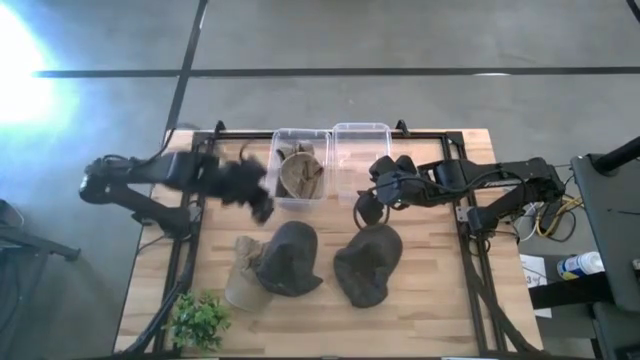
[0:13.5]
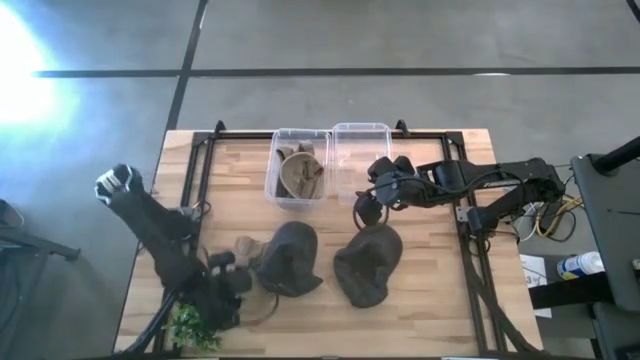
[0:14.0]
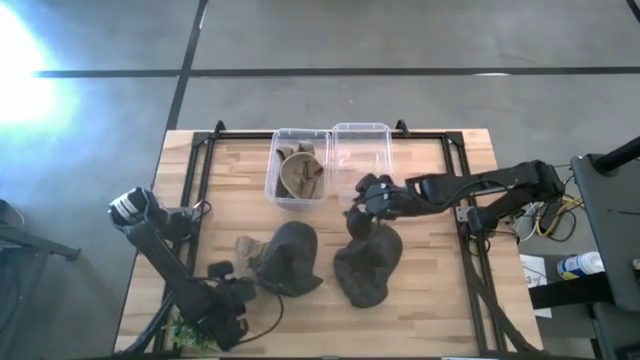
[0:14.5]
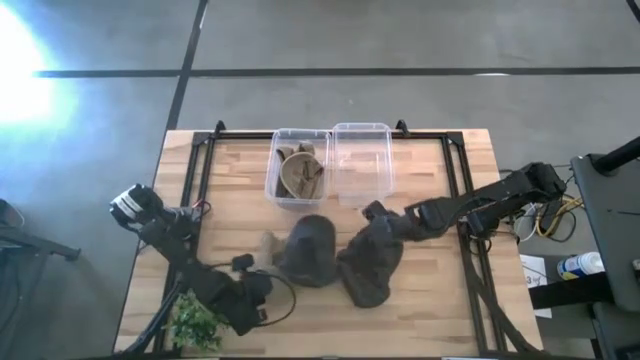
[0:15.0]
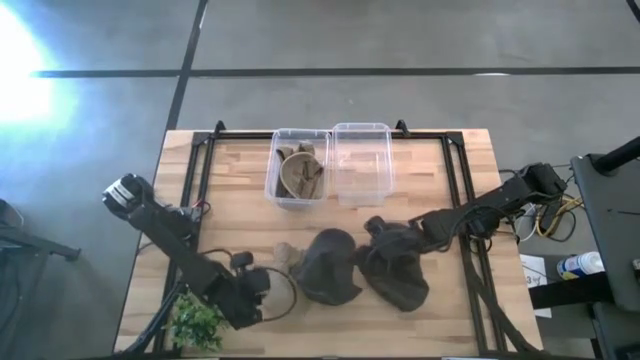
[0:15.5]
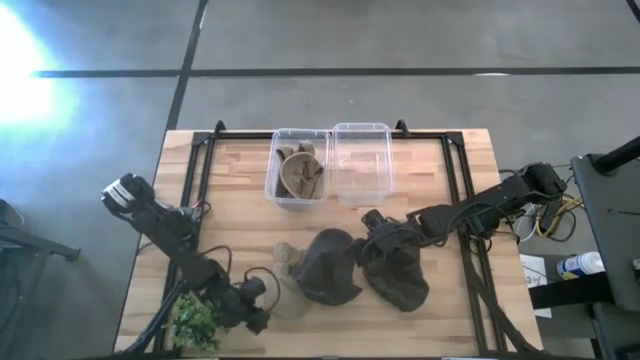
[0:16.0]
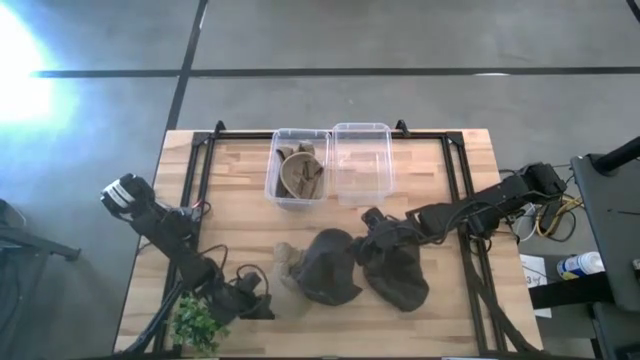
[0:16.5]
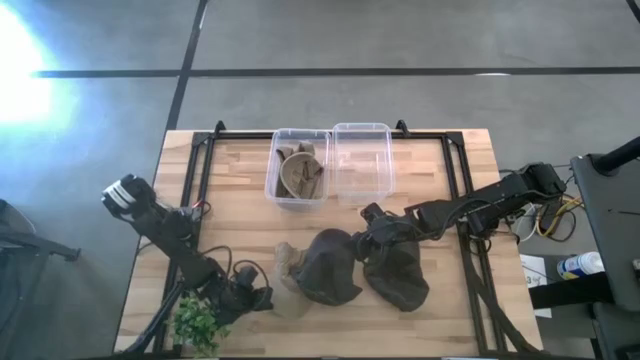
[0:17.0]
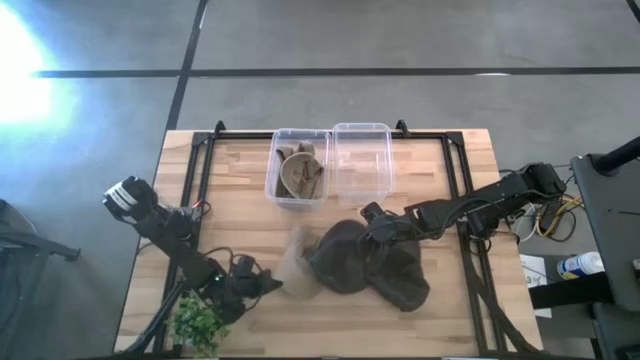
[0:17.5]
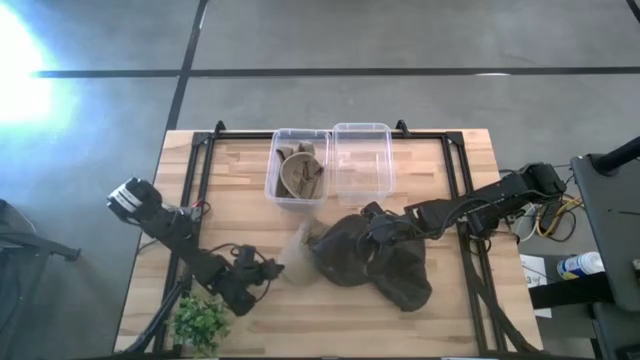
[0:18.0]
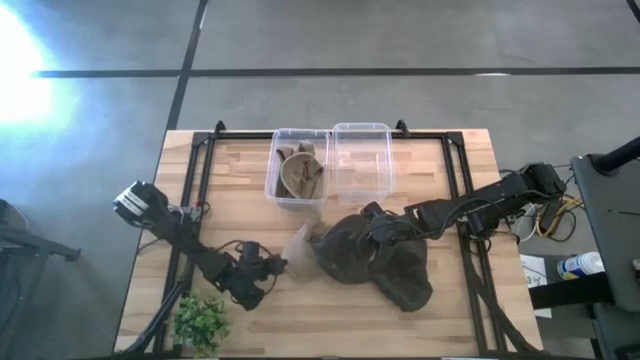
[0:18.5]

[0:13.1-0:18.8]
Task: Pick & Place hat
Put the brown cap into the left transparent bin

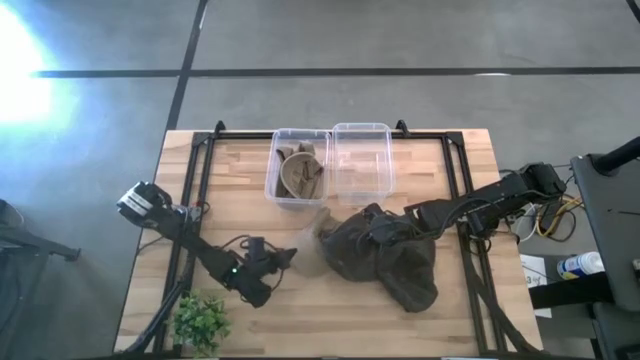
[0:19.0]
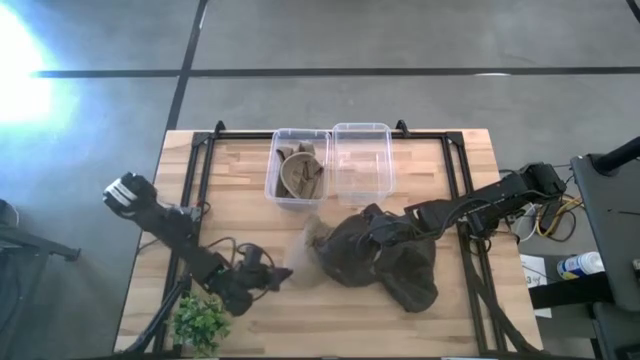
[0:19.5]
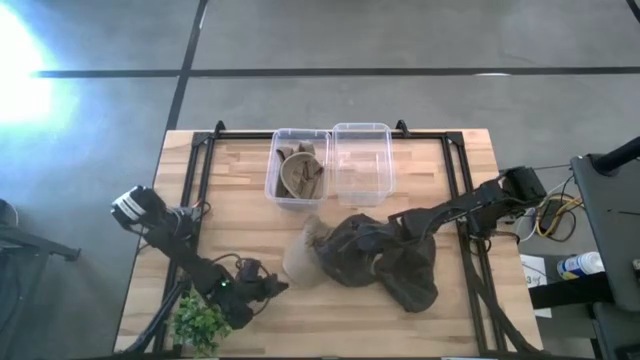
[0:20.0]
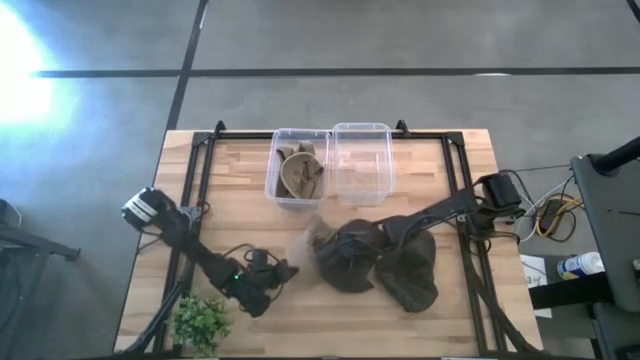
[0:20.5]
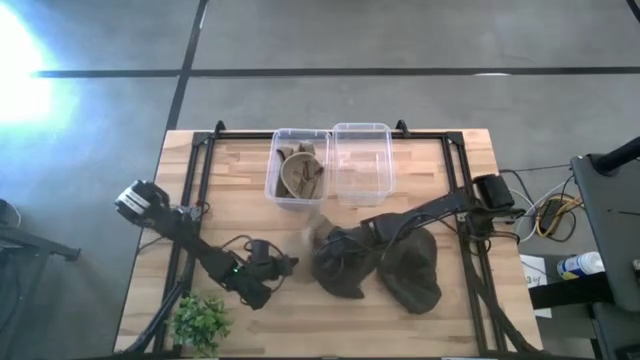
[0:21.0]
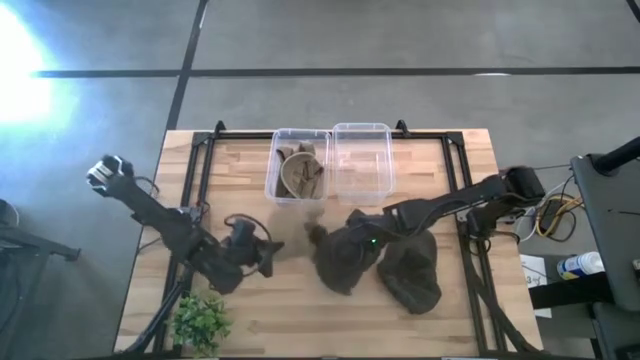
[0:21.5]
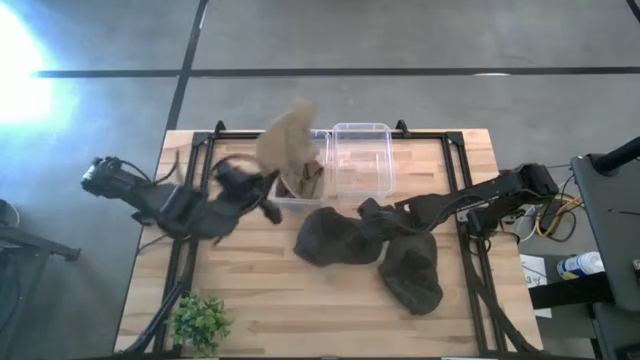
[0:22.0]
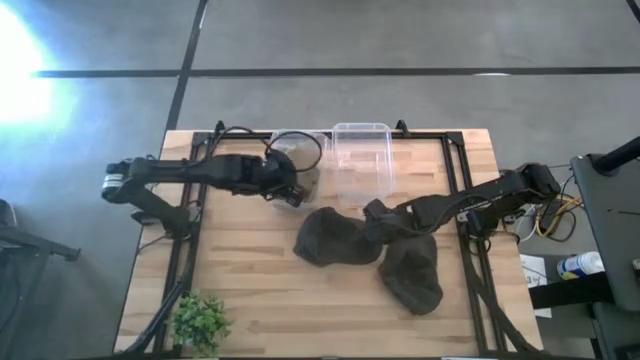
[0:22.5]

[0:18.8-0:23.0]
Put the brown cap into the left transparent bin

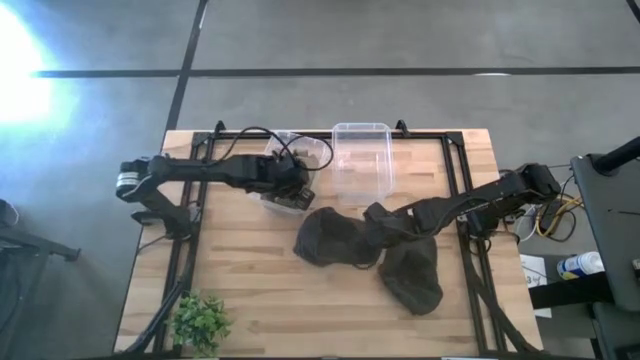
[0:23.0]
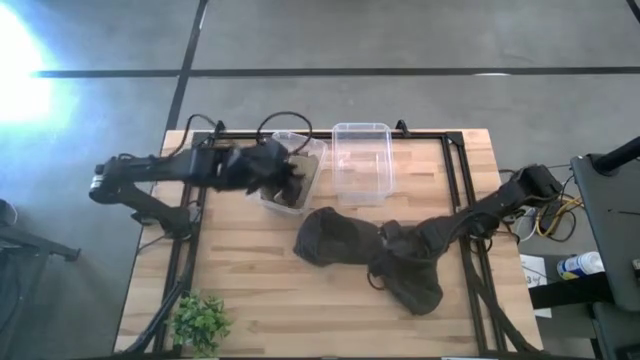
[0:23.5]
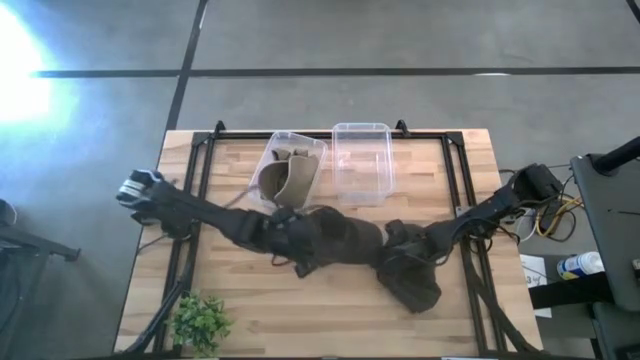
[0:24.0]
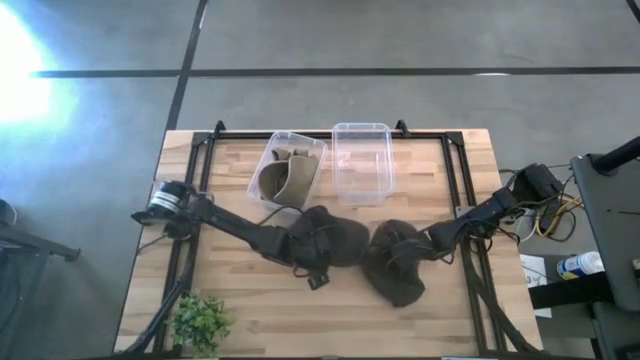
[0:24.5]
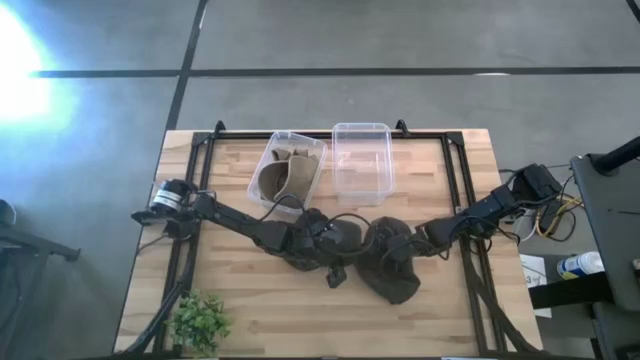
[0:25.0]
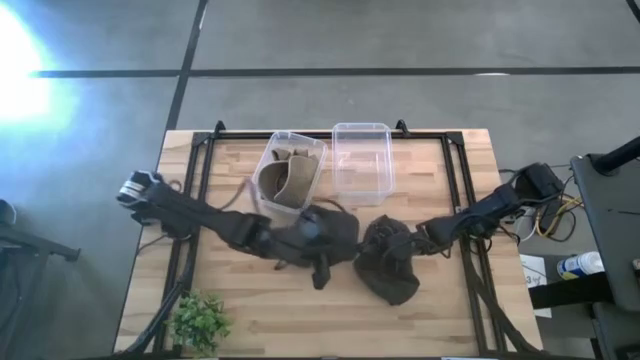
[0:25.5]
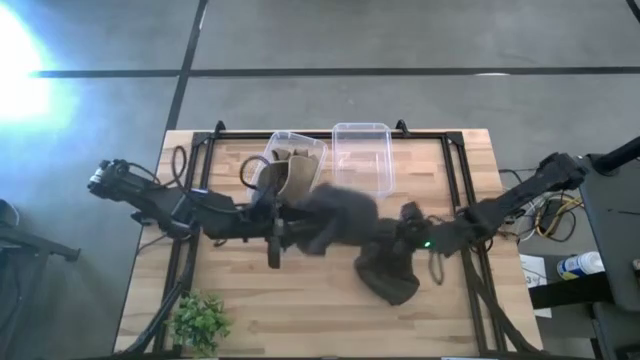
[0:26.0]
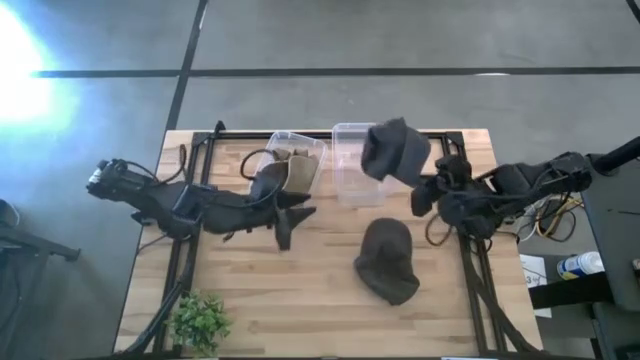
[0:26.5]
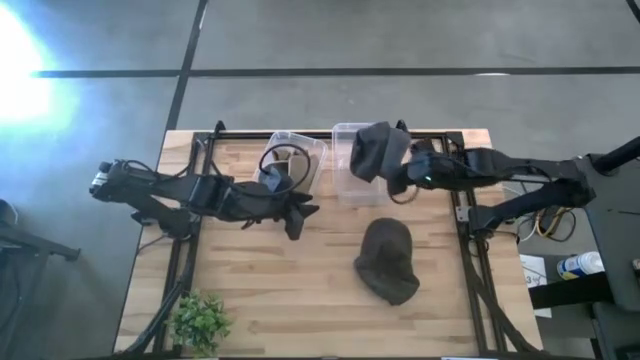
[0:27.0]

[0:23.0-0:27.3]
Put the left black cap into the right transparent bin

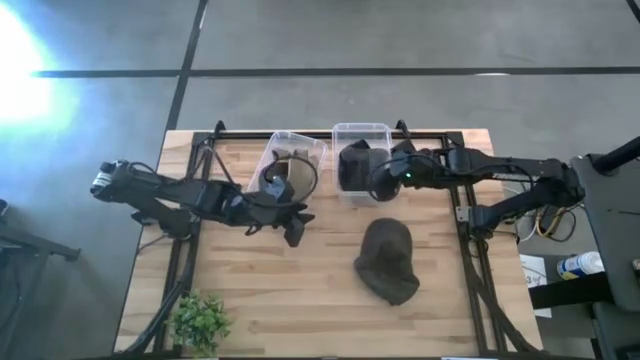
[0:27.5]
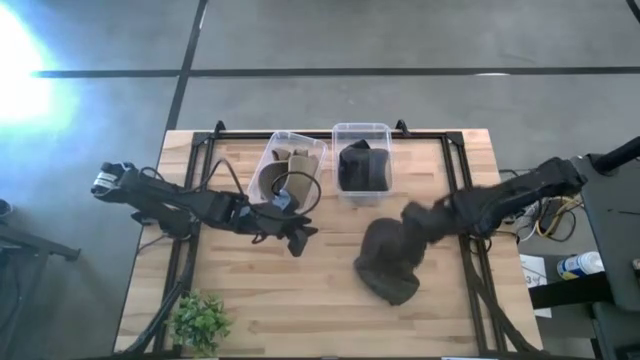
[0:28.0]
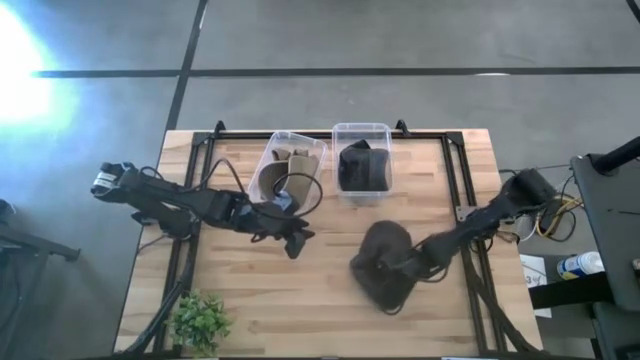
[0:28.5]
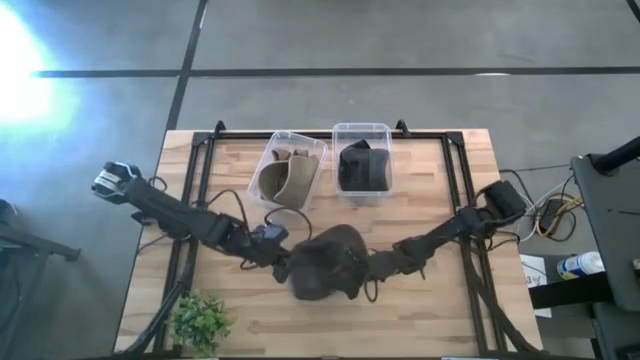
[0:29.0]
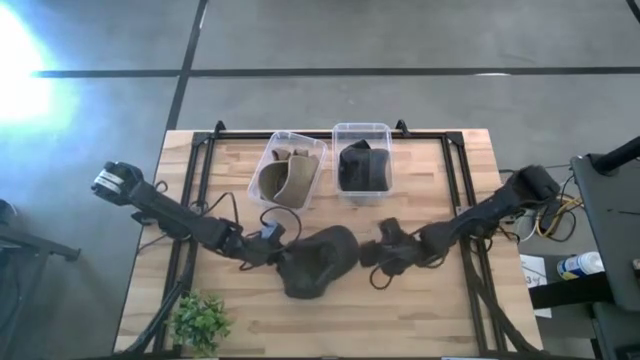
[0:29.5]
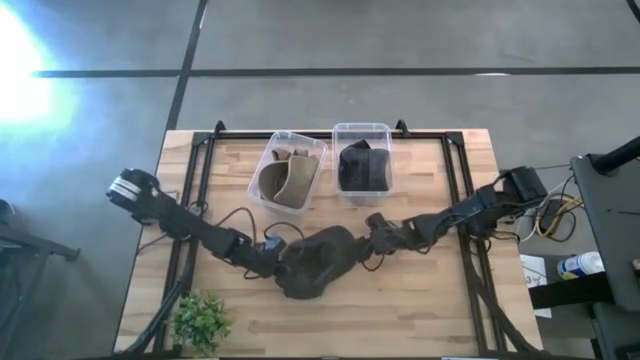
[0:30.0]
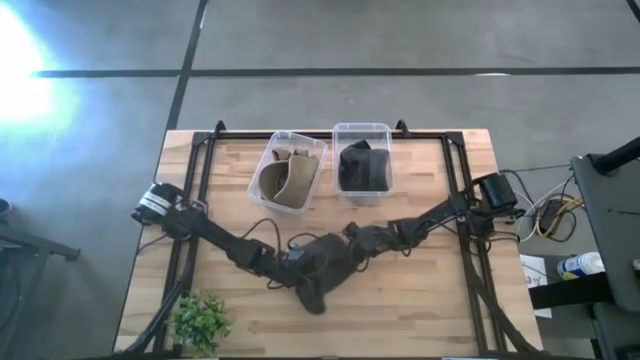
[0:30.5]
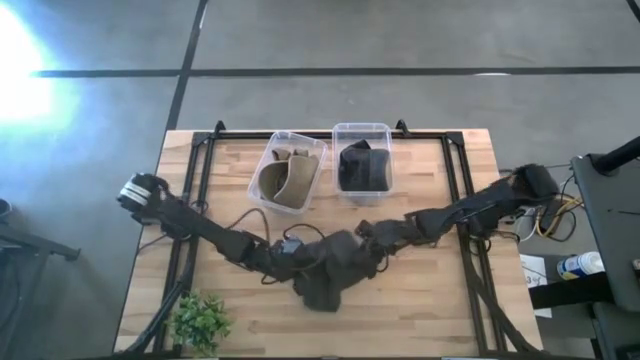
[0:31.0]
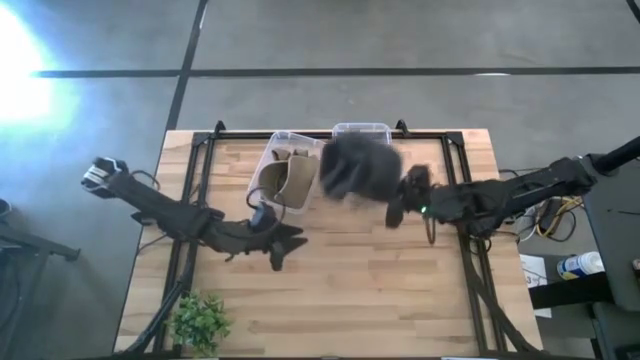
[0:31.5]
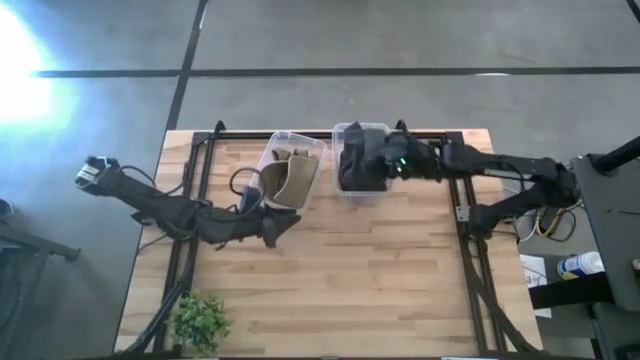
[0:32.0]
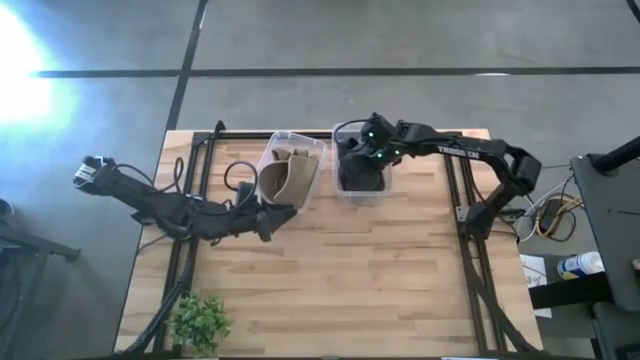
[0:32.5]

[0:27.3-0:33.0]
Put the black cap into the right transparent bin
